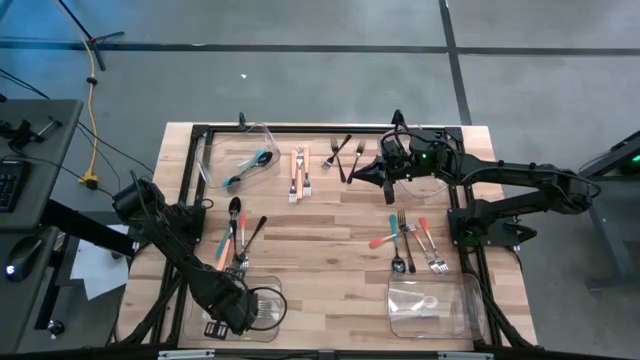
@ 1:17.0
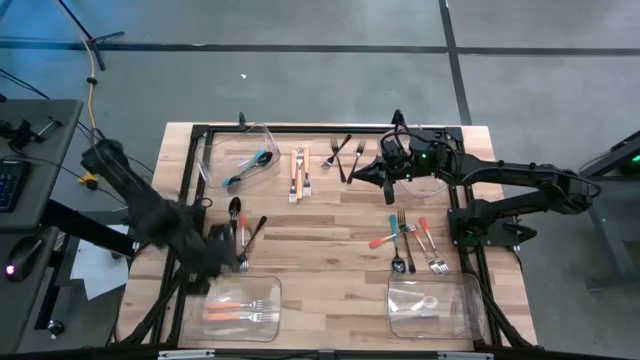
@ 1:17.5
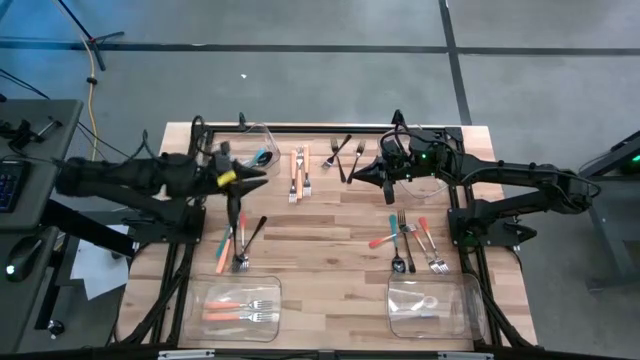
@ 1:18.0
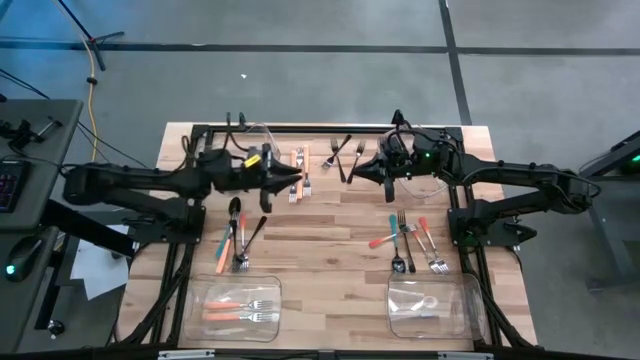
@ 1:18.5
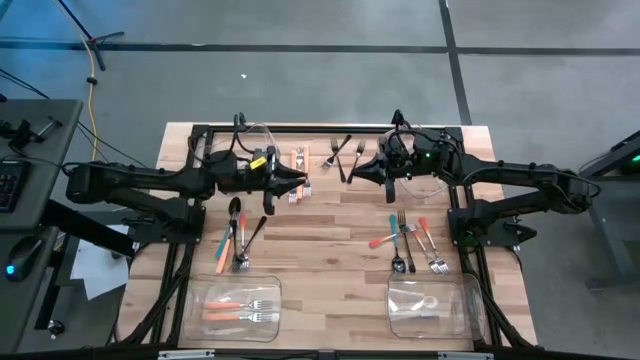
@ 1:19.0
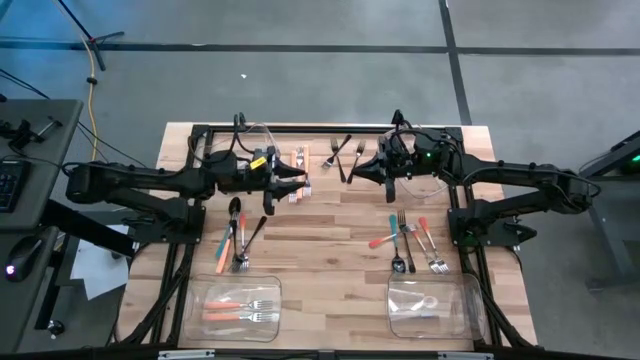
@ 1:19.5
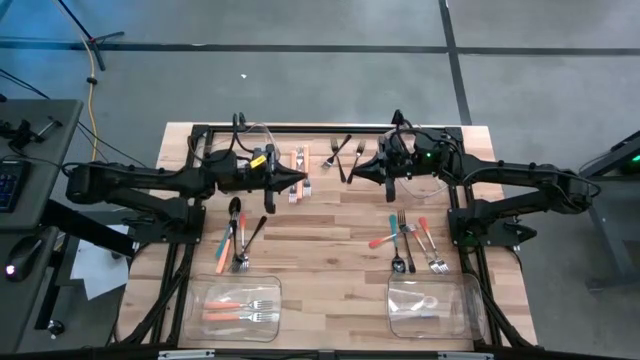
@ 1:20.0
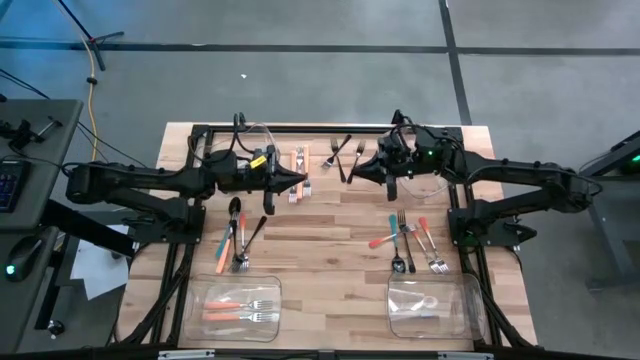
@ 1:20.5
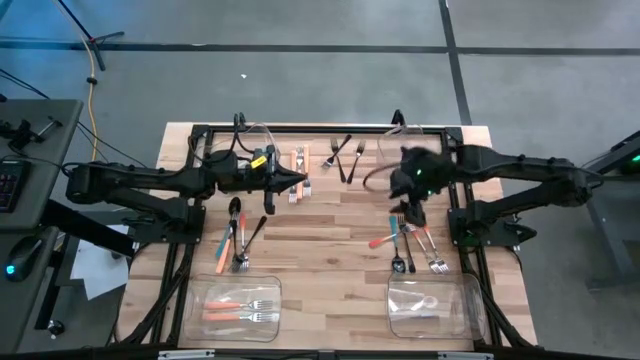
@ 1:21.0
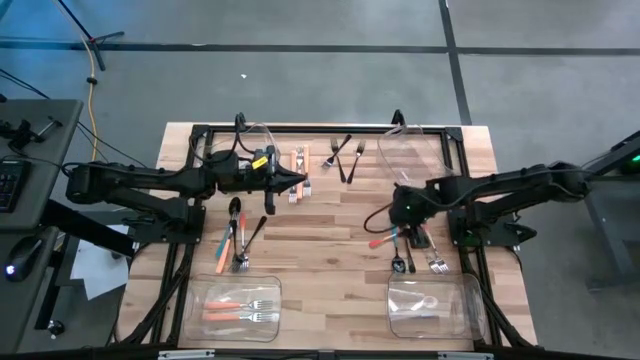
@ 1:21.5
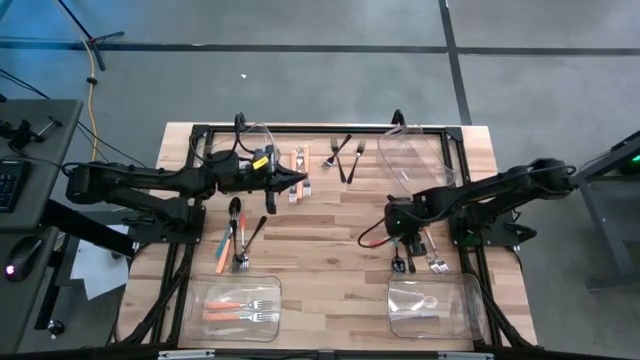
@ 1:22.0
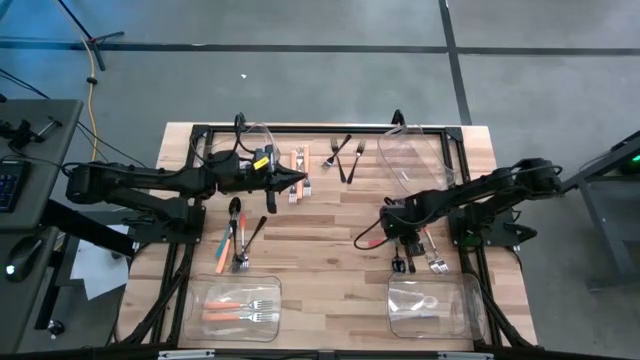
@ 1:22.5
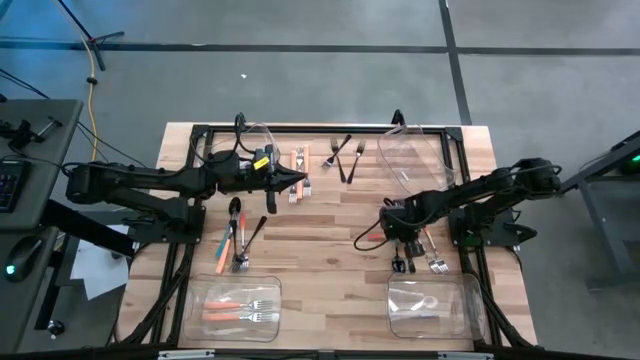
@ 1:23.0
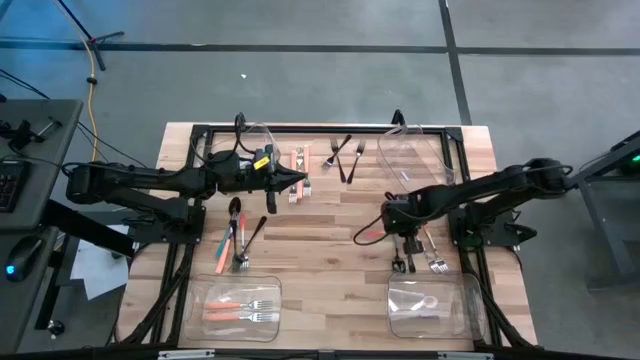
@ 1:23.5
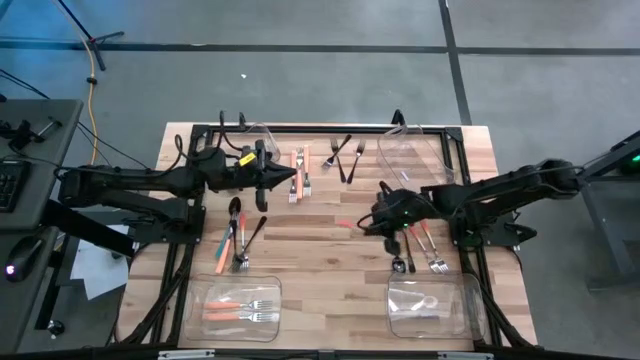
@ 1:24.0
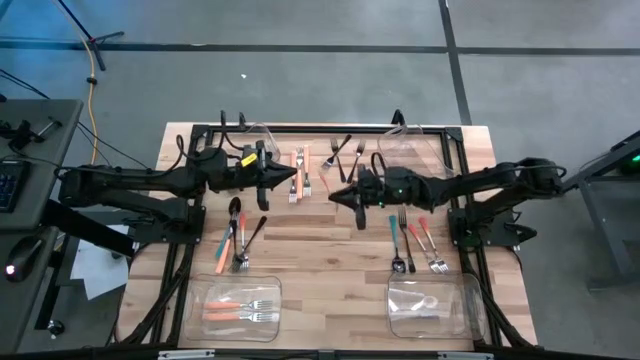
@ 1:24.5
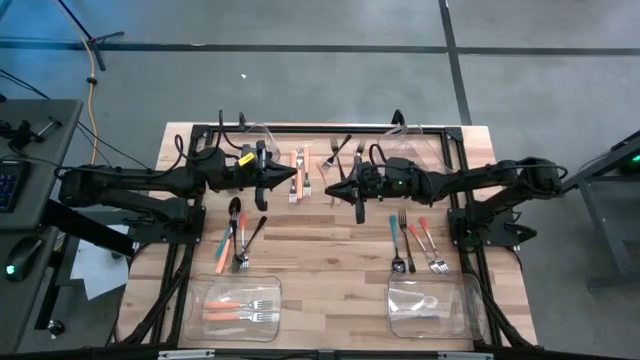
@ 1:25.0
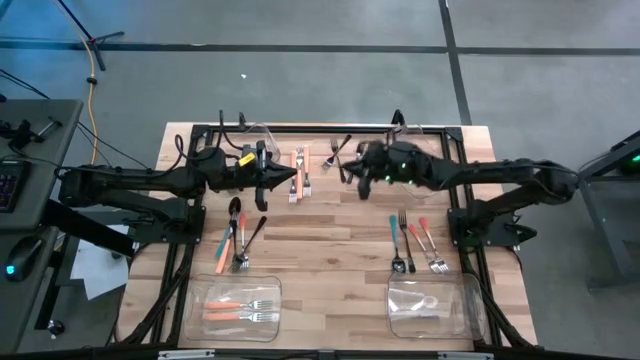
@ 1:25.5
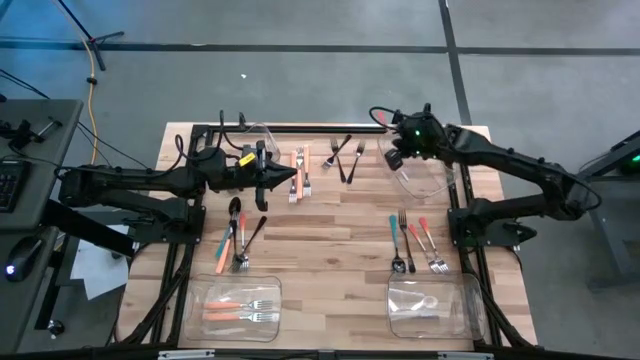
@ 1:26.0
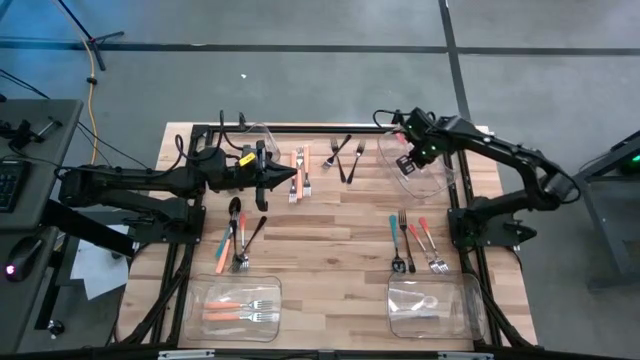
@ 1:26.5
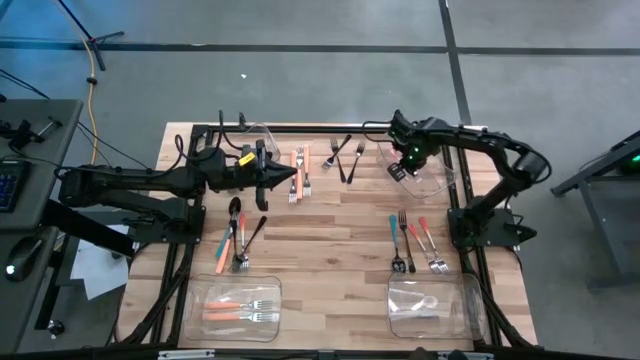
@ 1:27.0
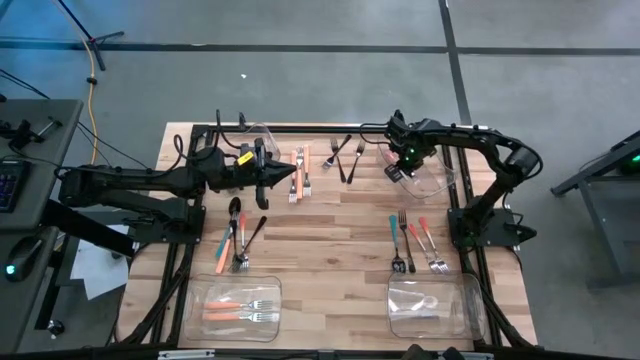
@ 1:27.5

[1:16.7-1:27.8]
Task: Sort silverware by color (type)
Put the orange fork into the top right transparent bin

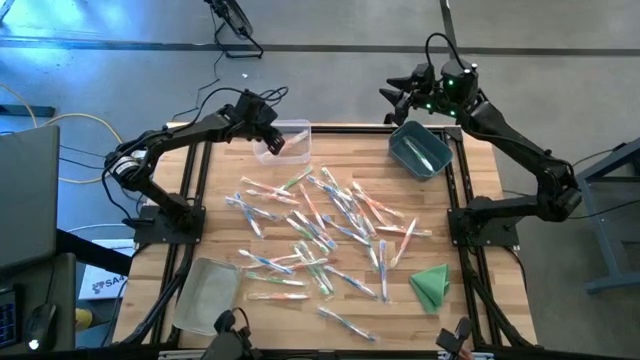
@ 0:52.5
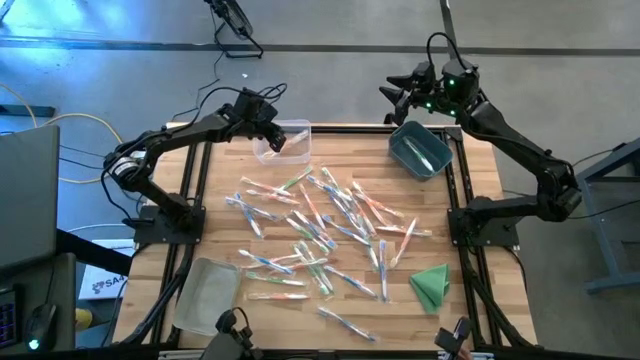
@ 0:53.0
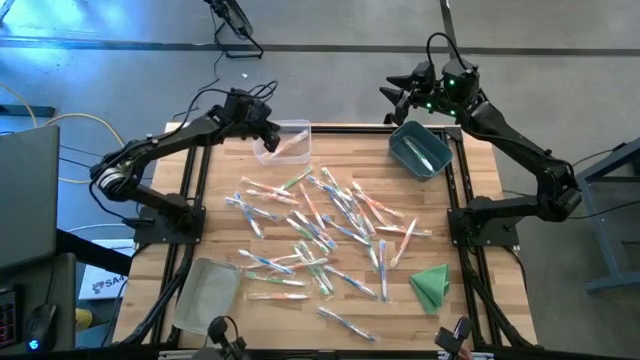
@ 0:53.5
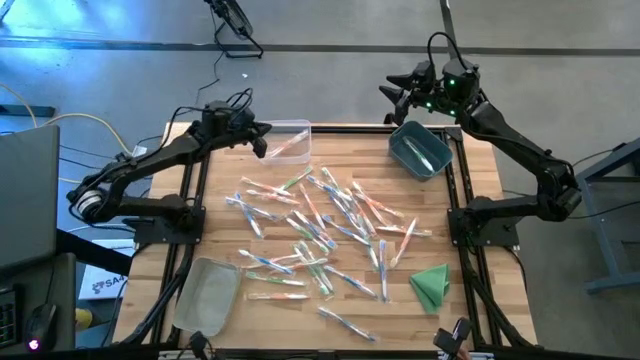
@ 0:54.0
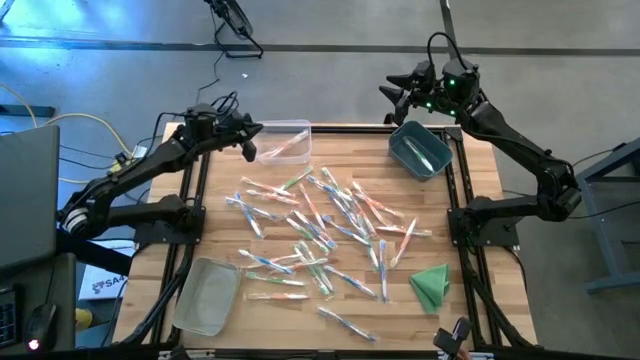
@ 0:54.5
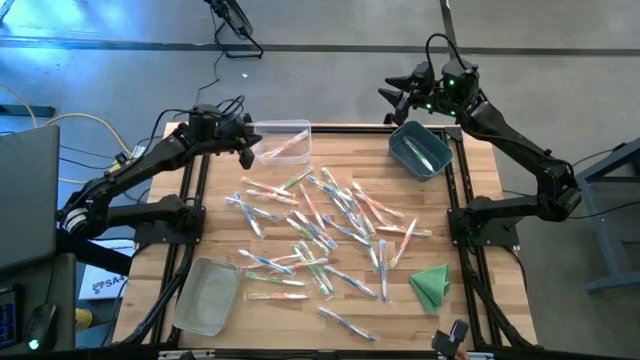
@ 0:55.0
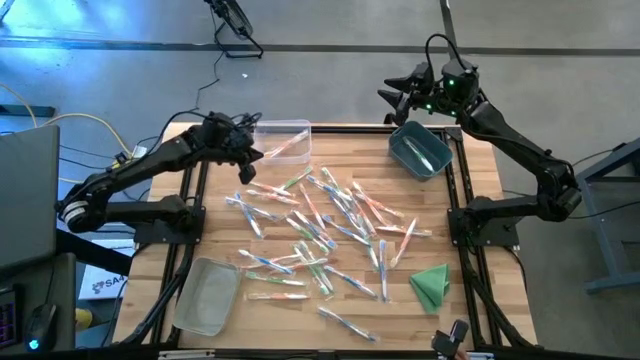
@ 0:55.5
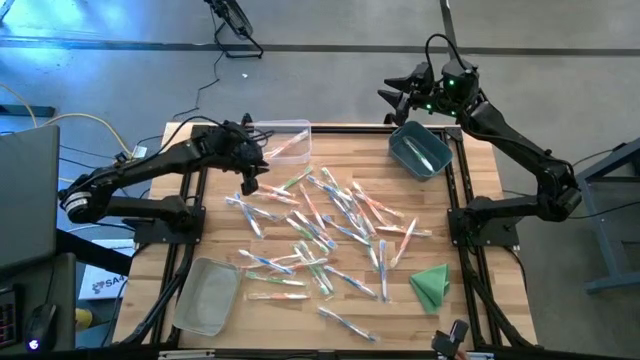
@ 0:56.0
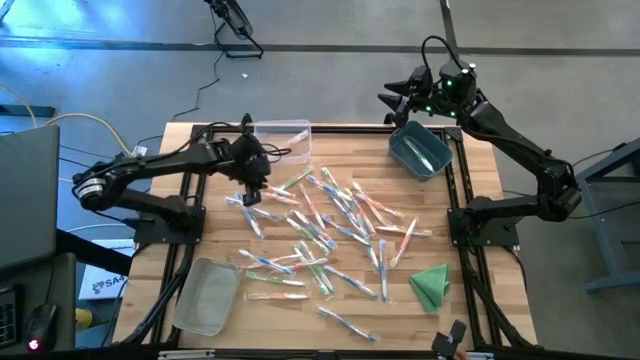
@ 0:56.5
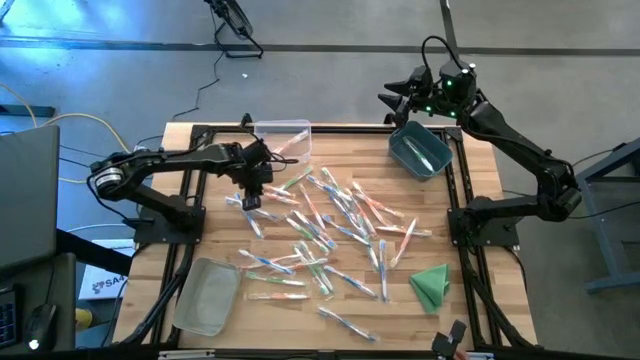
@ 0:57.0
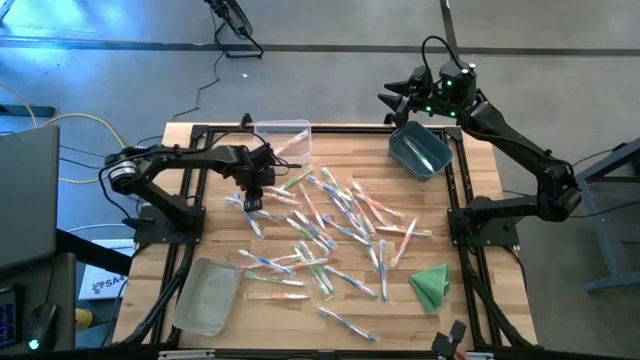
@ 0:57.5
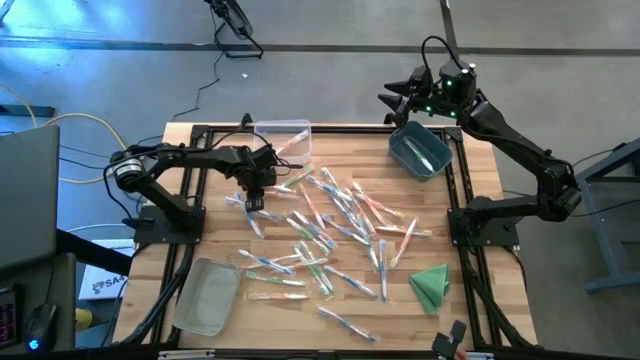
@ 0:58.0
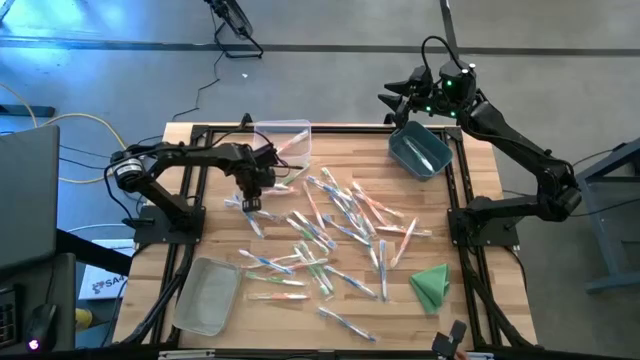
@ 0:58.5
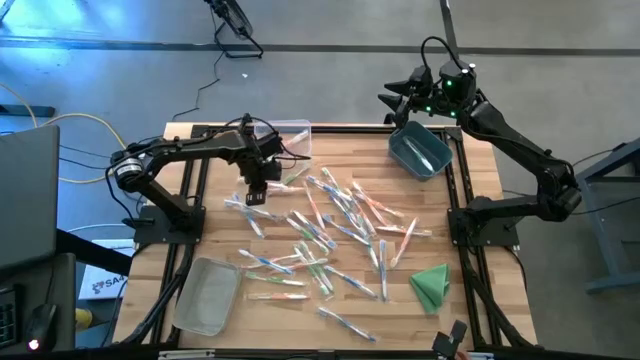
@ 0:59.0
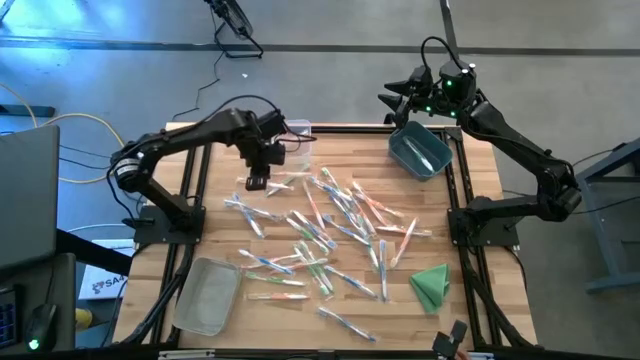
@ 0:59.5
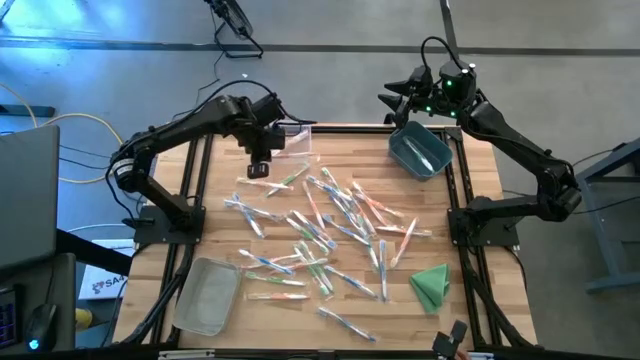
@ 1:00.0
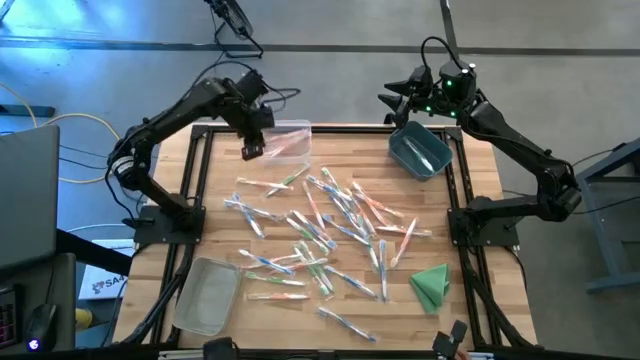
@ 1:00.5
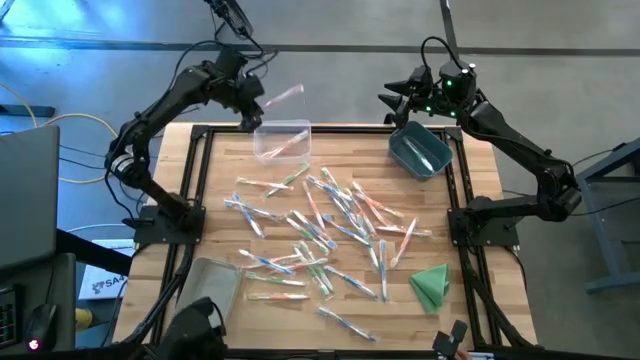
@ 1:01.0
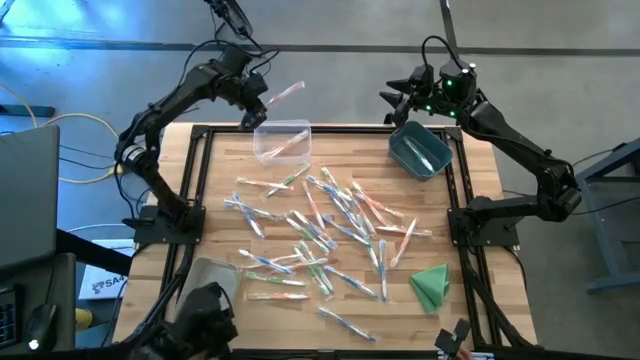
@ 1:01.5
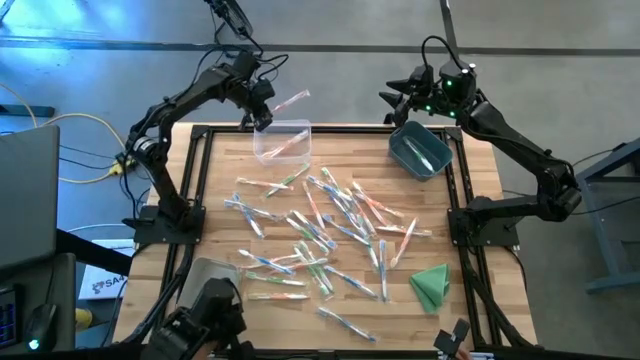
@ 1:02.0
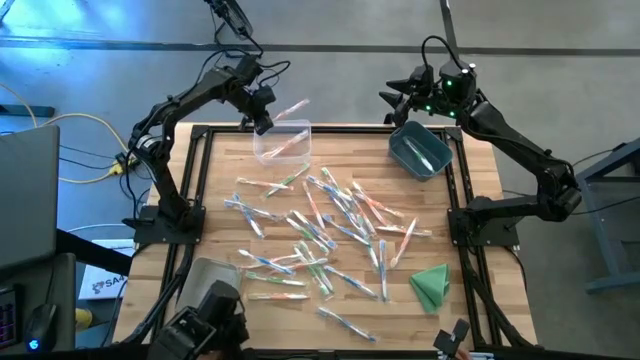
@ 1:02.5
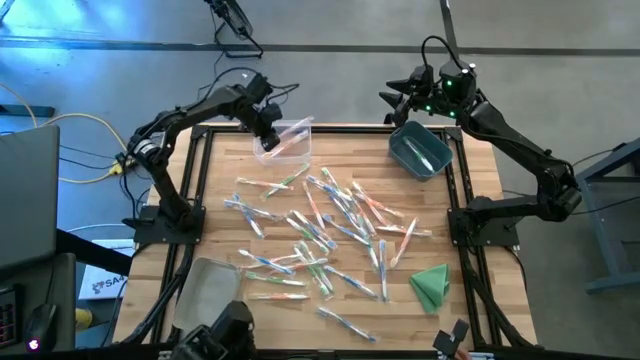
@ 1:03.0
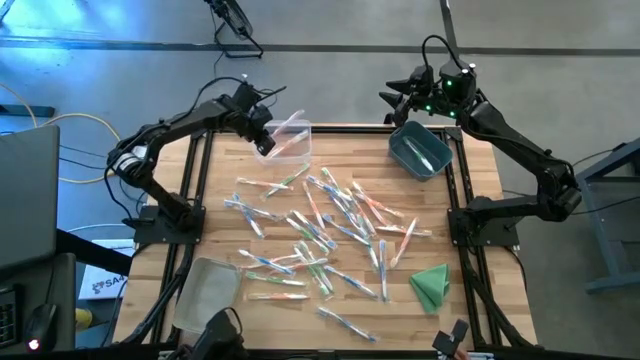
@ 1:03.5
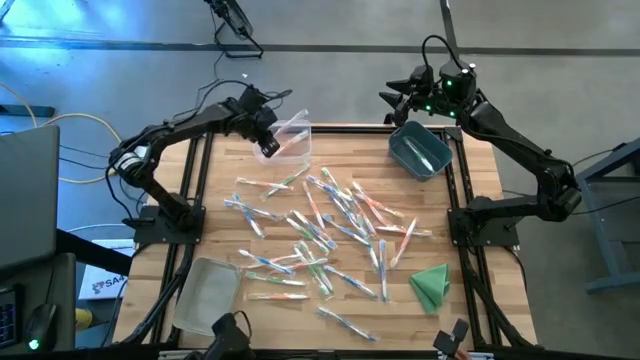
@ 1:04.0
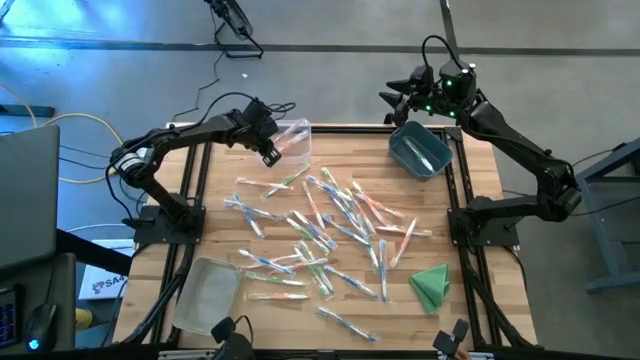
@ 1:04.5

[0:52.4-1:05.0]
Task: Pick & Place Toothbrushes
Put the orange toothbrush into the transparent bin
